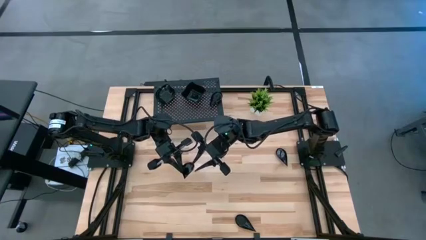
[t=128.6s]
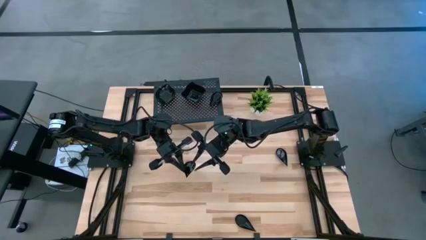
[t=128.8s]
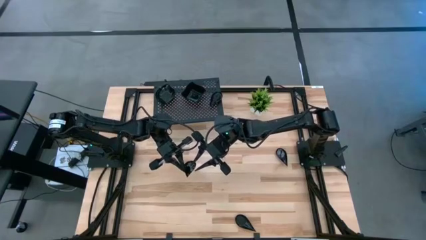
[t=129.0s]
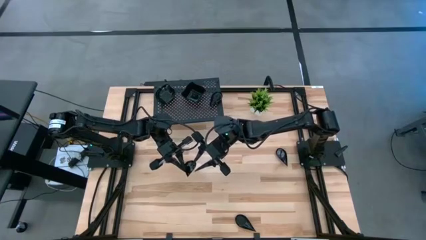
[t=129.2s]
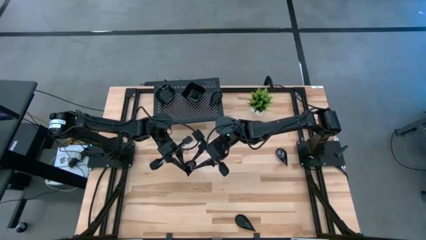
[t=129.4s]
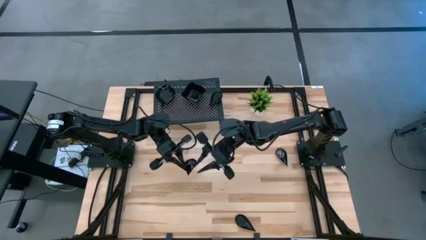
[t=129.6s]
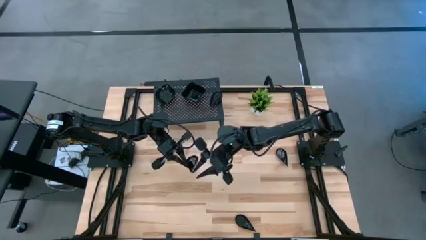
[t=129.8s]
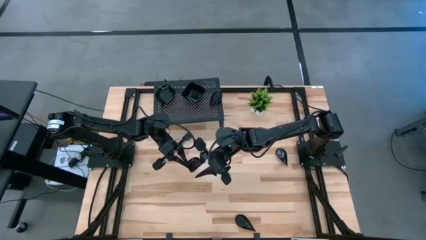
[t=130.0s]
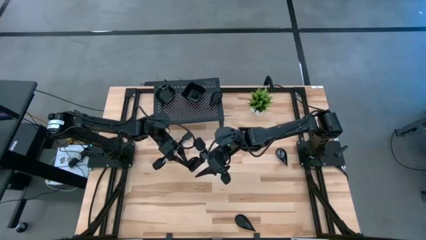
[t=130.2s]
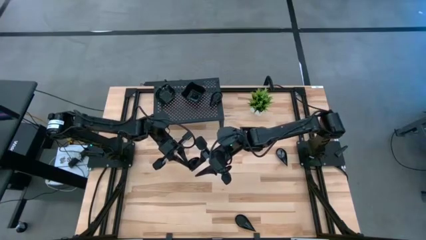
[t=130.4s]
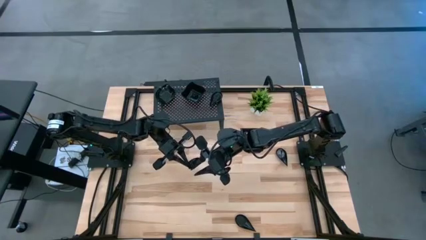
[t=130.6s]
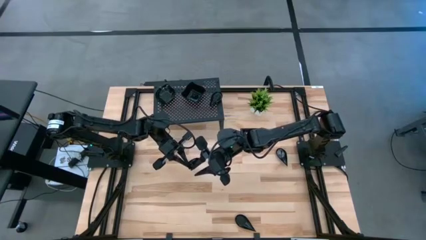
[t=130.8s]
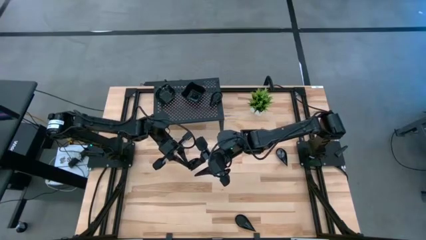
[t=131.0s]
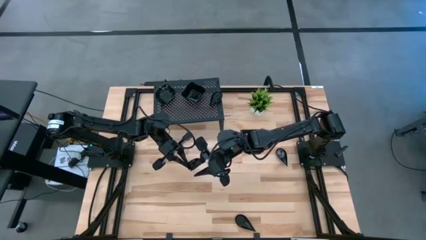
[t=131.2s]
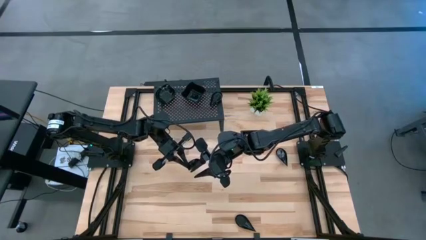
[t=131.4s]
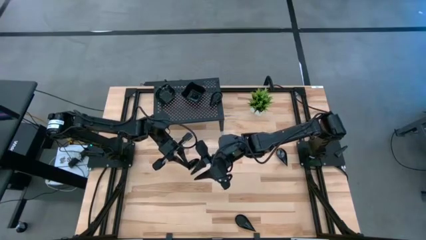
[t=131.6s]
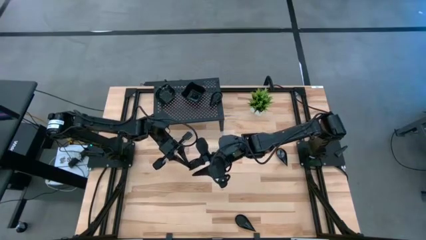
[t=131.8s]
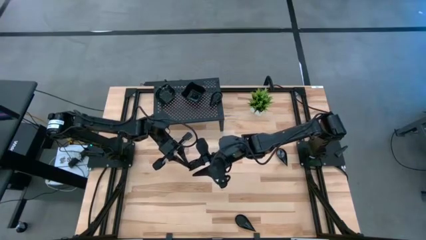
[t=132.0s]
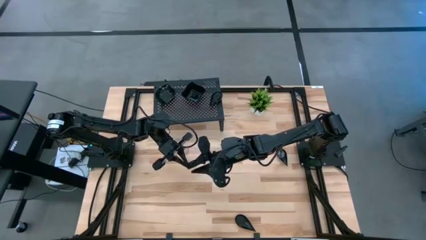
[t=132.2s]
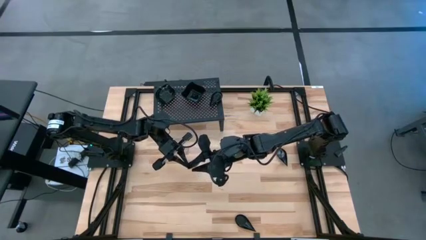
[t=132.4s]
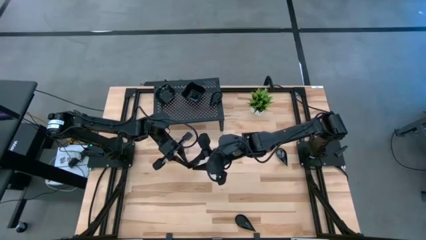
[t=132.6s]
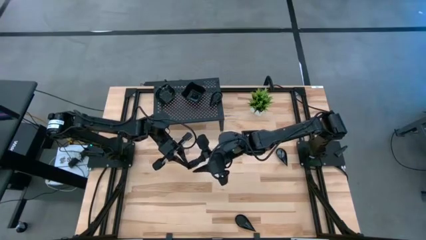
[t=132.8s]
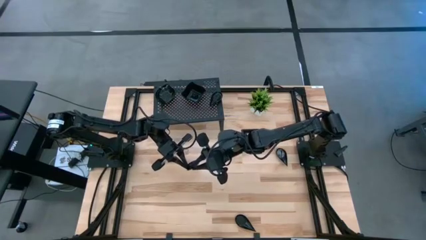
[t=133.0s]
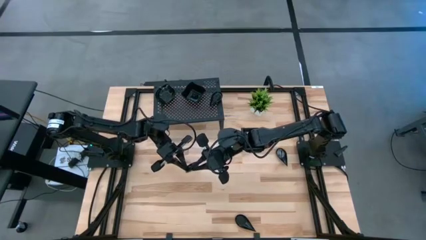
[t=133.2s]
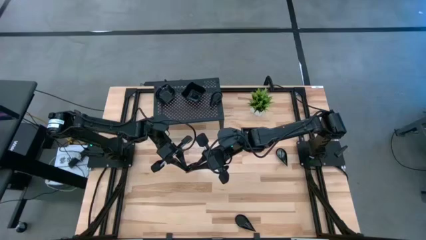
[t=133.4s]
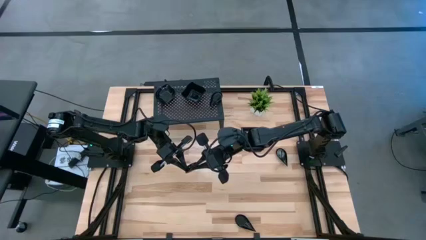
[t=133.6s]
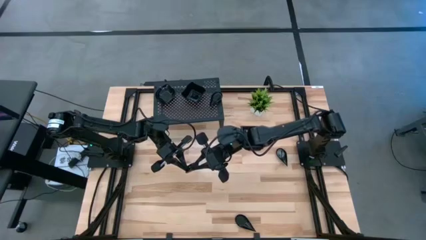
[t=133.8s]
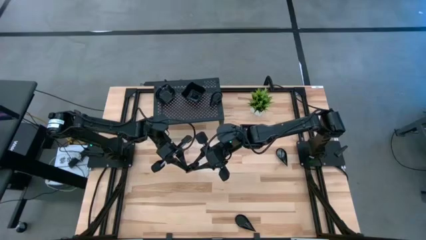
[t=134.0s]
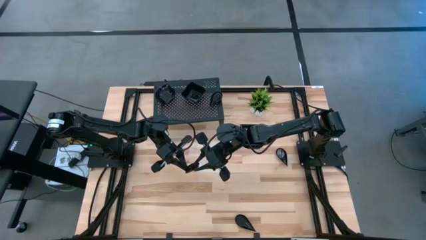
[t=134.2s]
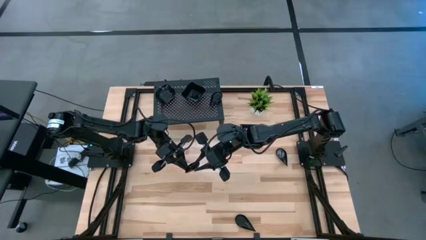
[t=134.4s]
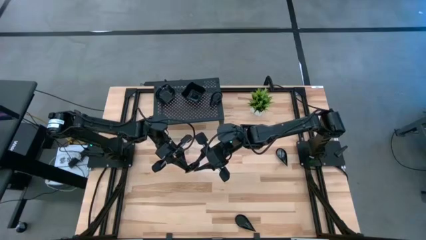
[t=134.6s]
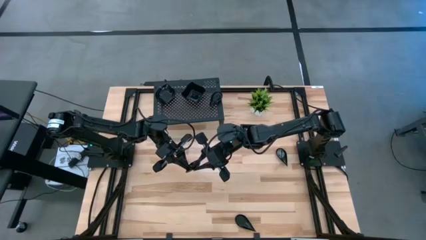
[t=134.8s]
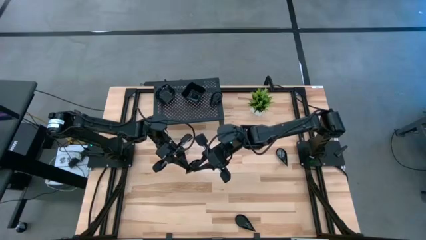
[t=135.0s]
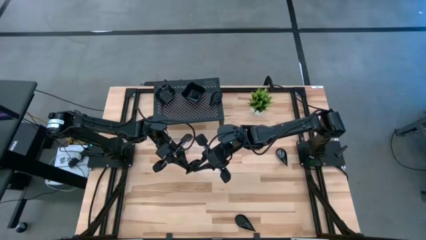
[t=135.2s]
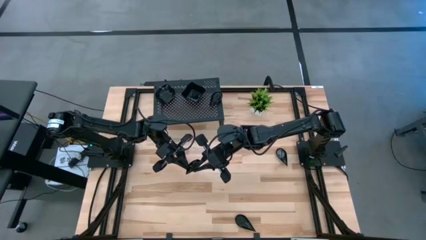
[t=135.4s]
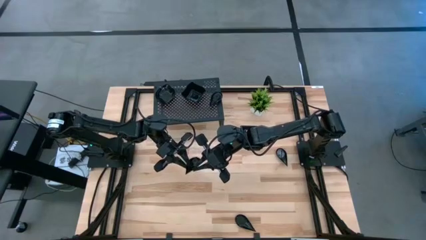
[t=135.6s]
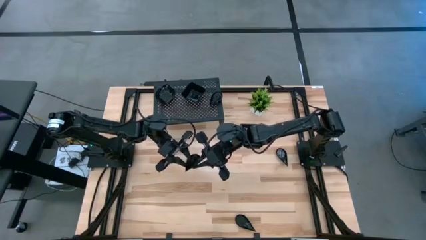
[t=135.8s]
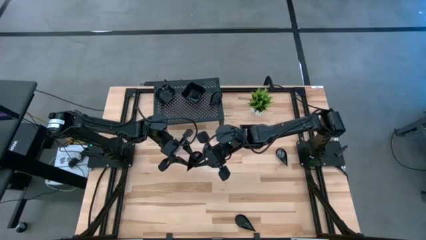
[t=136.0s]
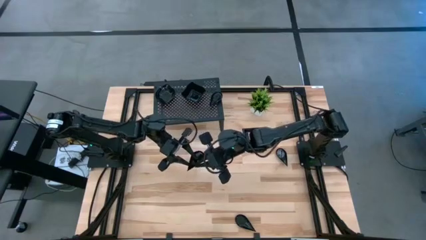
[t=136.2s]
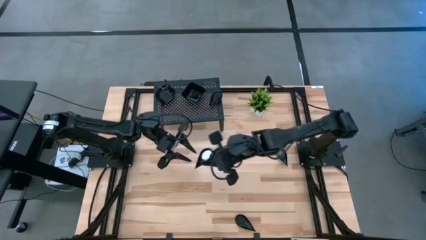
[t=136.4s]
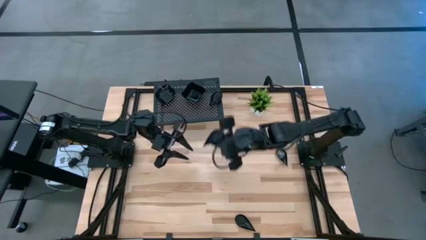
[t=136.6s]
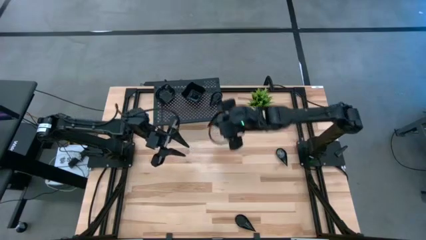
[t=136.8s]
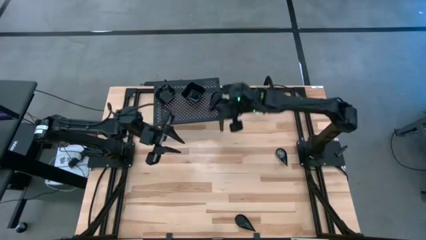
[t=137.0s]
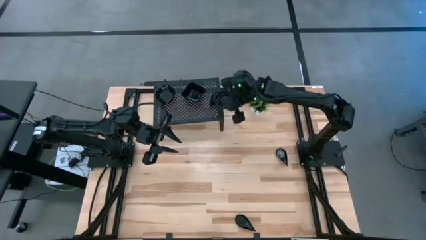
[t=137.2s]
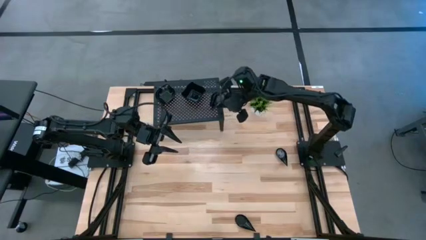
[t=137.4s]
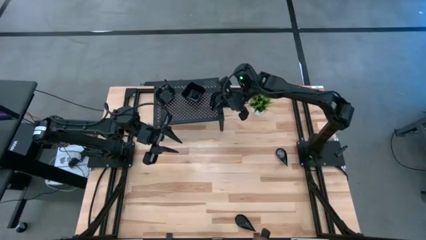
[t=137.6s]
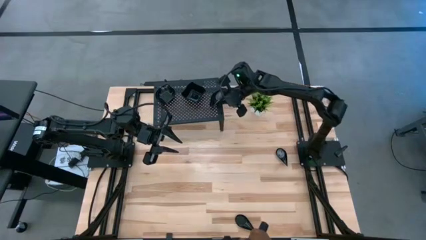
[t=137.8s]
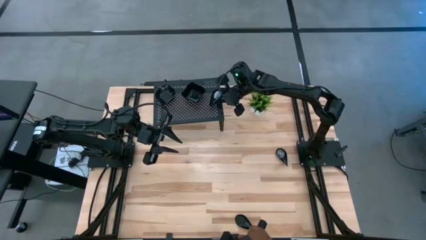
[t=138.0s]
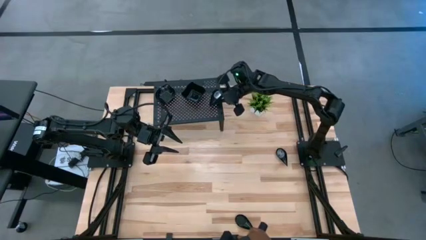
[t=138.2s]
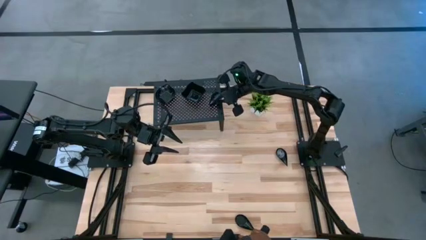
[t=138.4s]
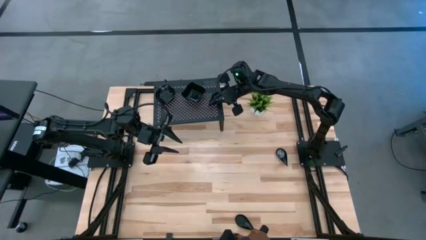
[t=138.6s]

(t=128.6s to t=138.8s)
Task: Pick & Place Mini shaped plates
Stack the black drop shaped plate on the top of the black drop shaped plates on the shelf

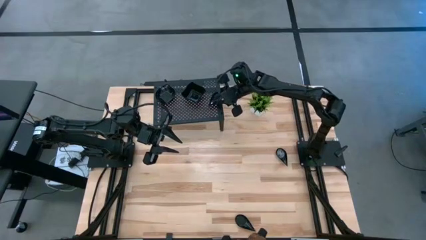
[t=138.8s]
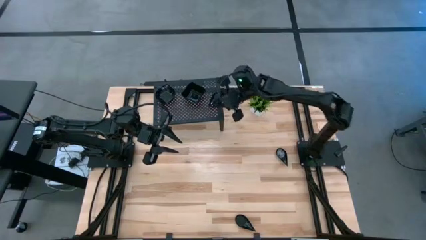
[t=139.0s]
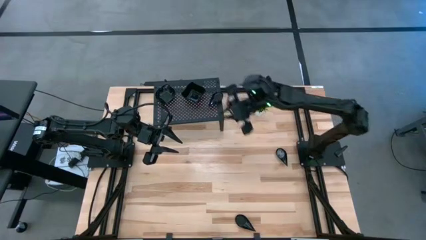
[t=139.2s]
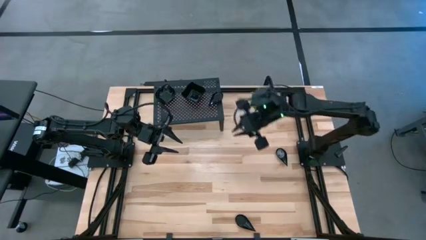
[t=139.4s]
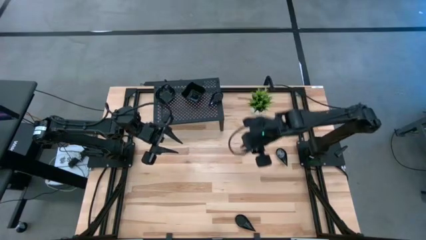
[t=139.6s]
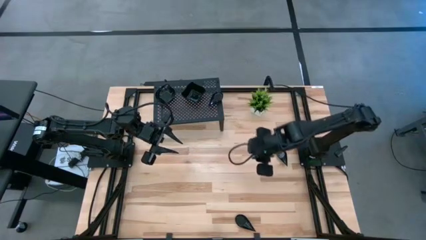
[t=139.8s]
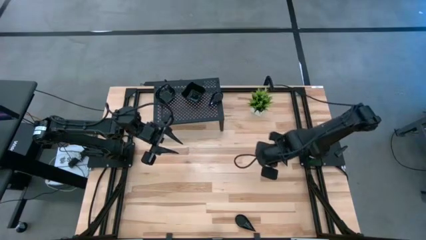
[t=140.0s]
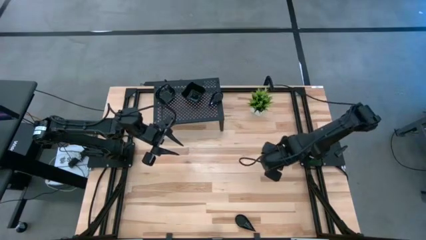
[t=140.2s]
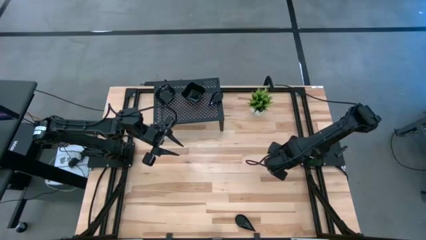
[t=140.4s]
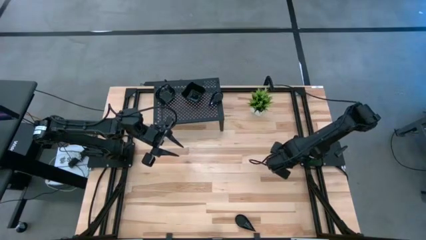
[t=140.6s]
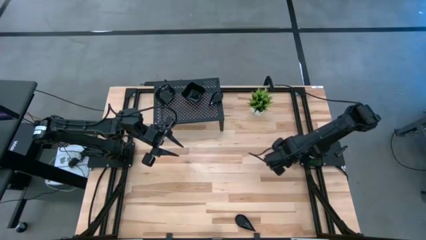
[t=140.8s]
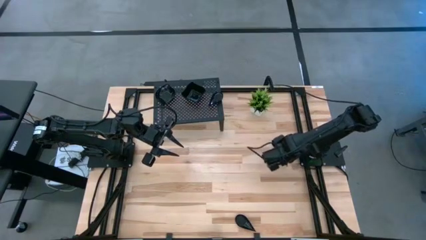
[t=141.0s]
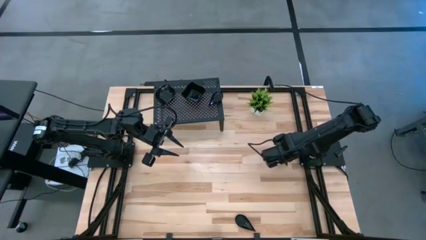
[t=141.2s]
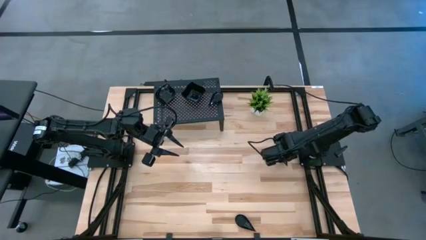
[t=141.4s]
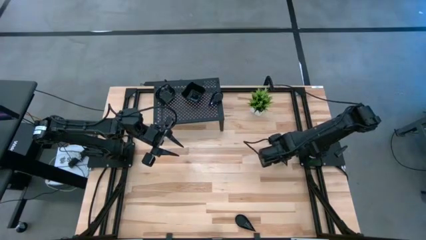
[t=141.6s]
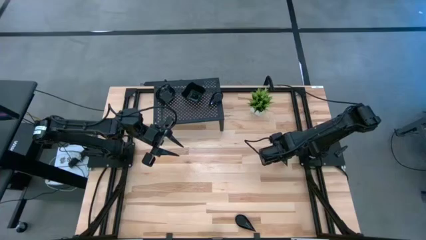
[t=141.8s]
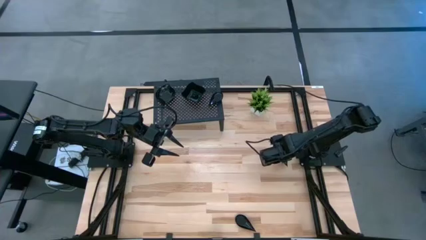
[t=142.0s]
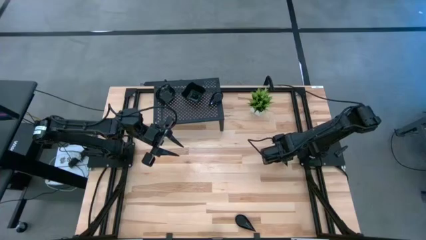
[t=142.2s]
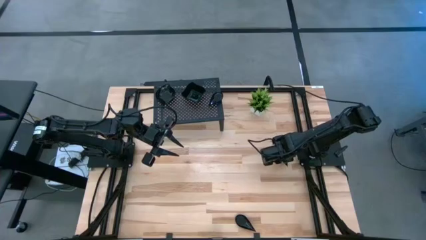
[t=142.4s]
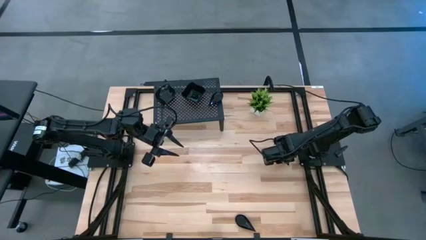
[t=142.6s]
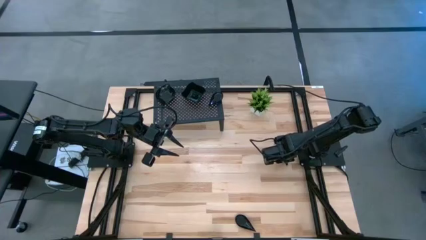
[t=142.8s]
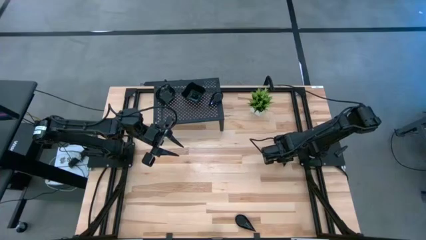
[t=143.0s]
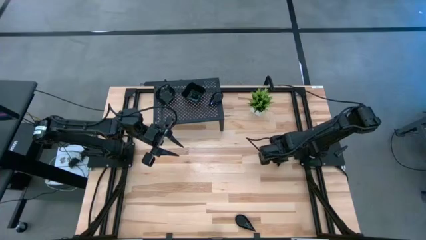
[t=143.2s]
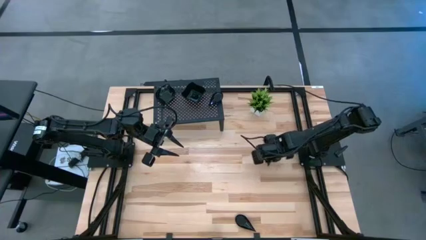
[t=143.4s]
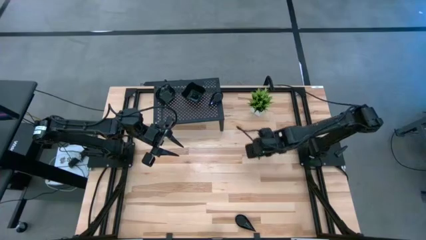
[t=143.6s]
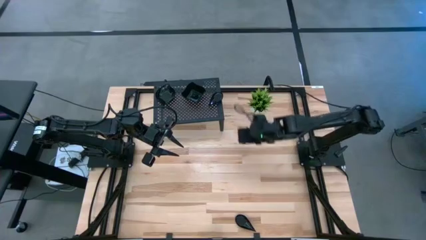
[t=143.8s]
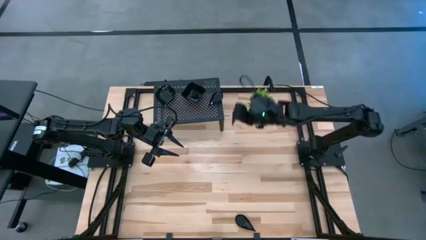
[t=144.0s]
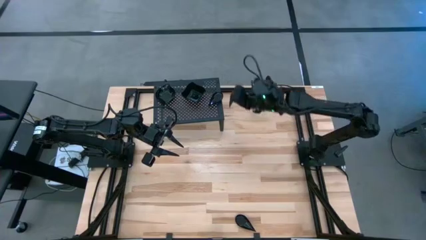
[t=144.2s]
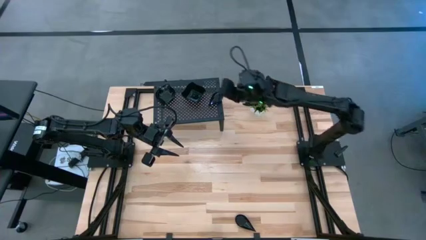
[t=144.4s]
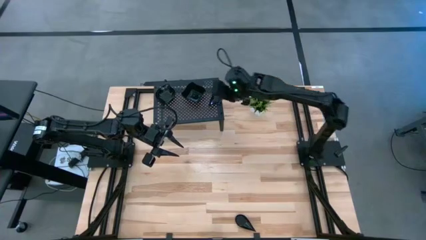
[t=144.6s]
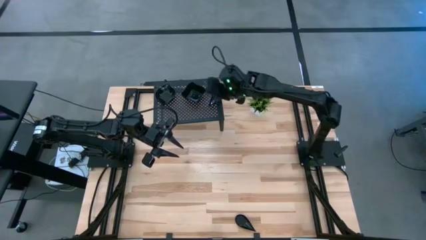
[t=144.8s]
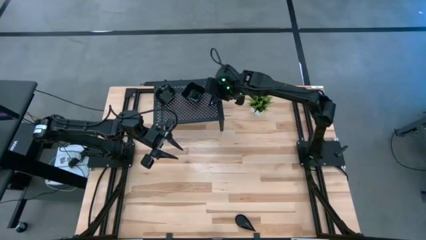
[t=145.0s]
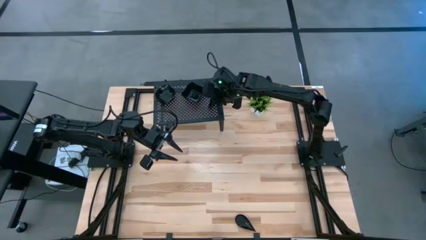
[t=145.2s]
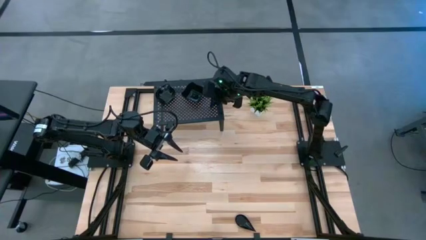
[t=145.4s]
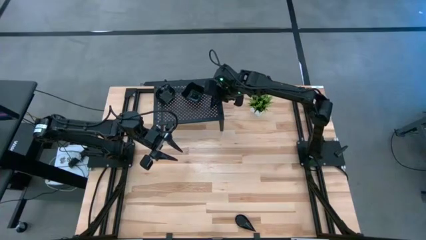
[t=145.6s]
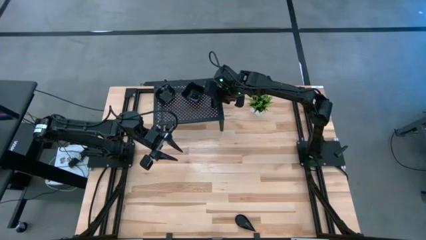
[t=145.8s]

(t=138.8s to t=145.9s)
Stack the black drop shaped plate on the top of the black drop shaped plates on the shelf
